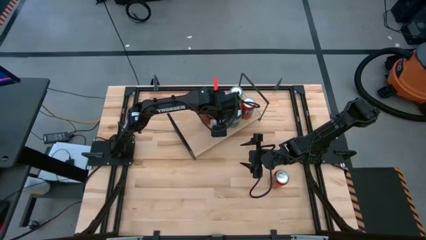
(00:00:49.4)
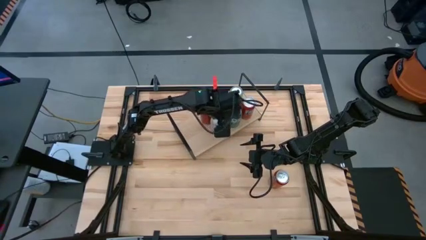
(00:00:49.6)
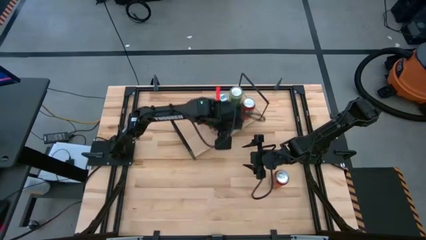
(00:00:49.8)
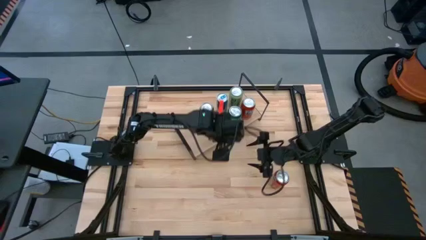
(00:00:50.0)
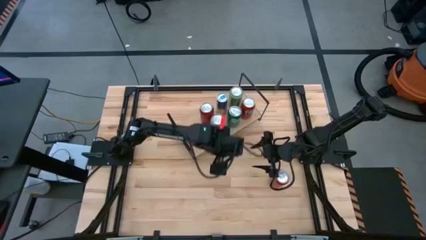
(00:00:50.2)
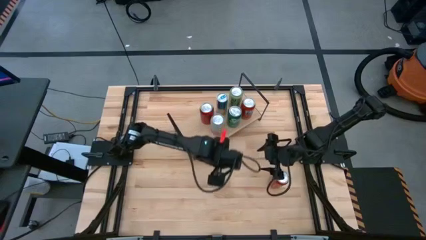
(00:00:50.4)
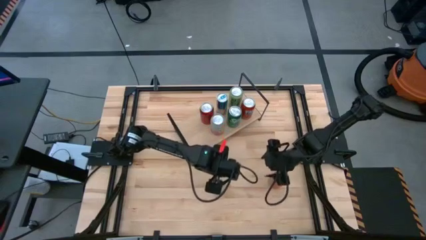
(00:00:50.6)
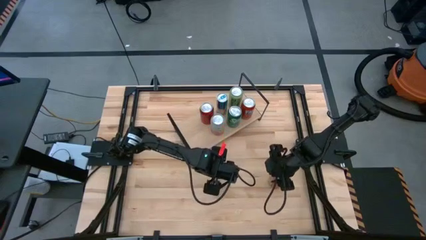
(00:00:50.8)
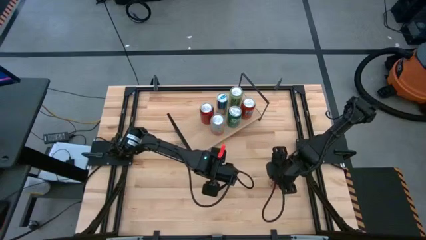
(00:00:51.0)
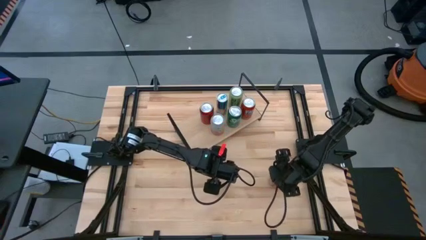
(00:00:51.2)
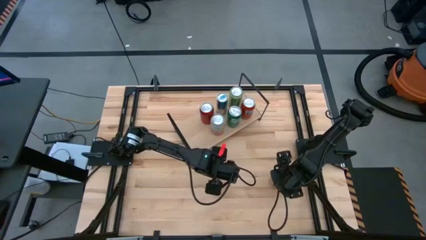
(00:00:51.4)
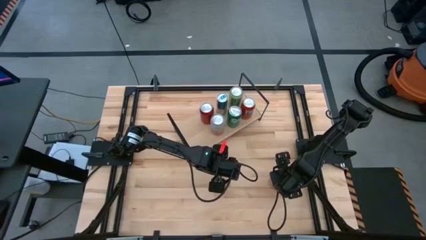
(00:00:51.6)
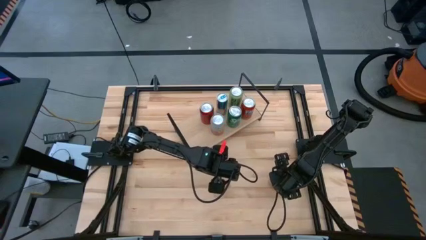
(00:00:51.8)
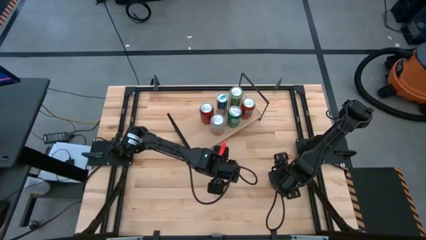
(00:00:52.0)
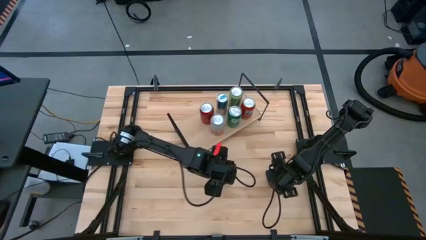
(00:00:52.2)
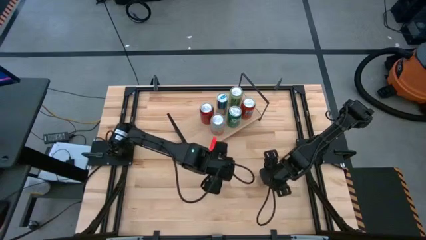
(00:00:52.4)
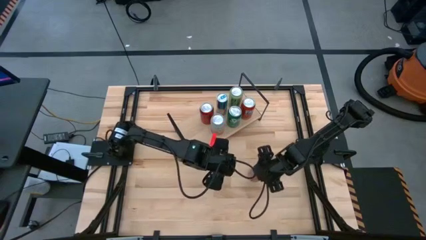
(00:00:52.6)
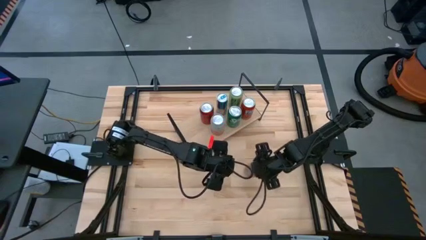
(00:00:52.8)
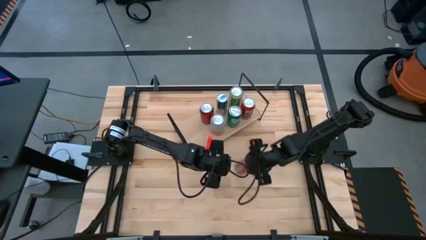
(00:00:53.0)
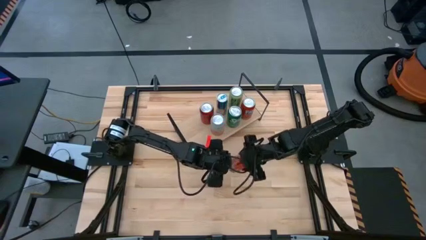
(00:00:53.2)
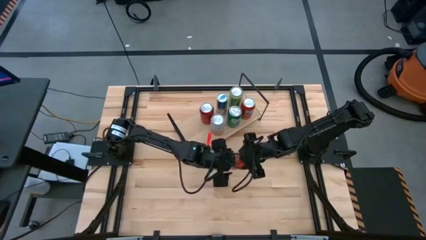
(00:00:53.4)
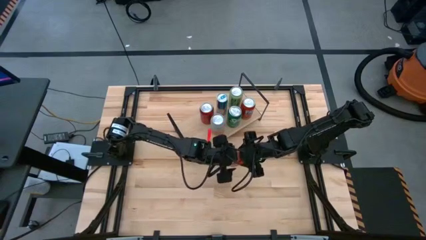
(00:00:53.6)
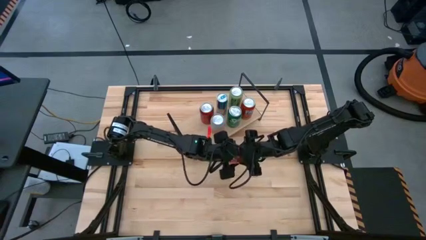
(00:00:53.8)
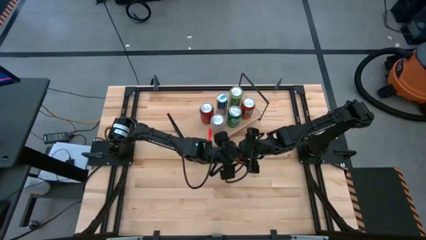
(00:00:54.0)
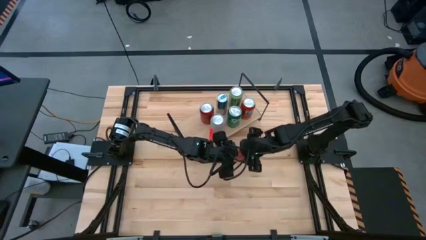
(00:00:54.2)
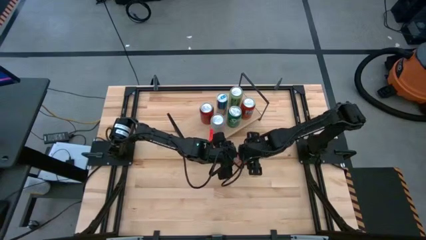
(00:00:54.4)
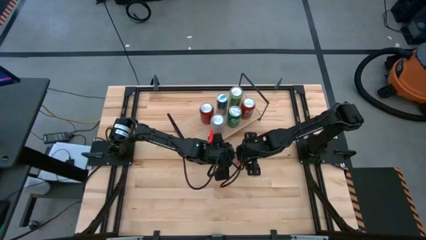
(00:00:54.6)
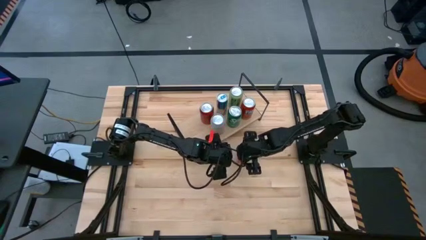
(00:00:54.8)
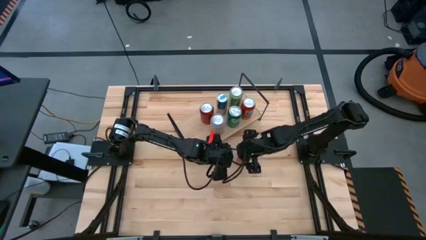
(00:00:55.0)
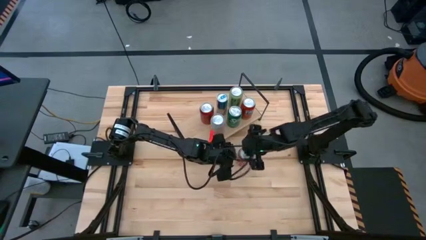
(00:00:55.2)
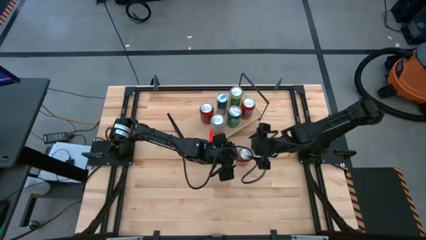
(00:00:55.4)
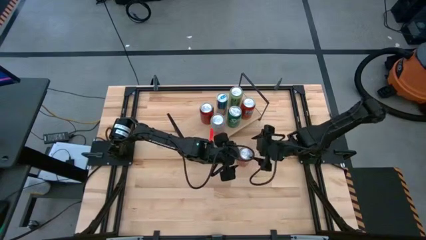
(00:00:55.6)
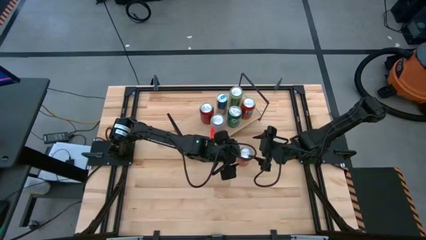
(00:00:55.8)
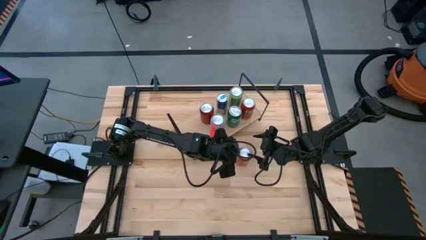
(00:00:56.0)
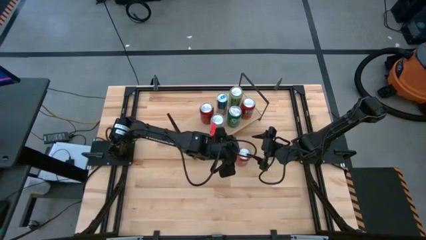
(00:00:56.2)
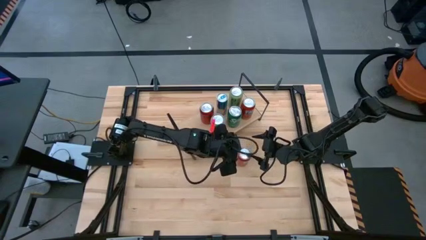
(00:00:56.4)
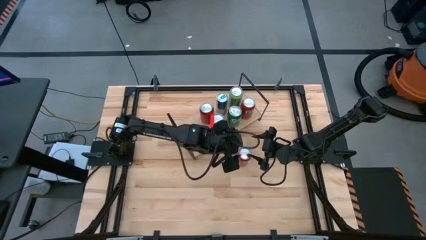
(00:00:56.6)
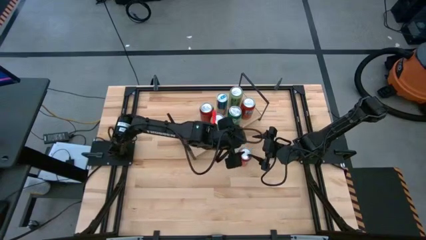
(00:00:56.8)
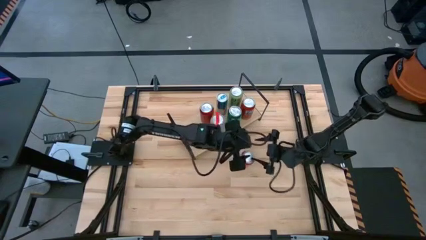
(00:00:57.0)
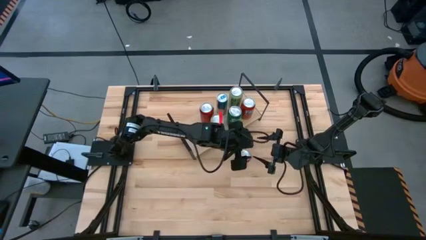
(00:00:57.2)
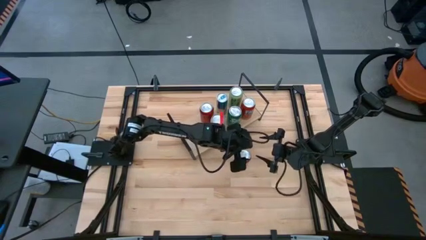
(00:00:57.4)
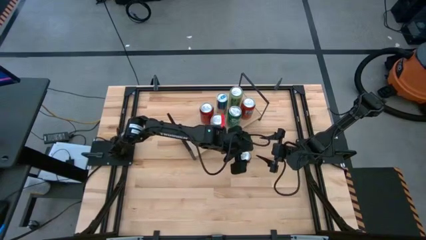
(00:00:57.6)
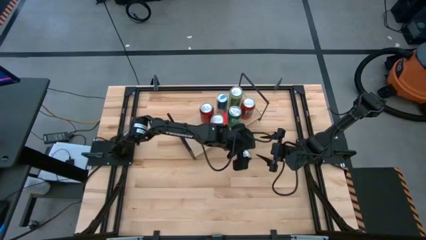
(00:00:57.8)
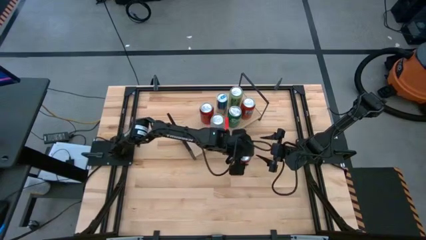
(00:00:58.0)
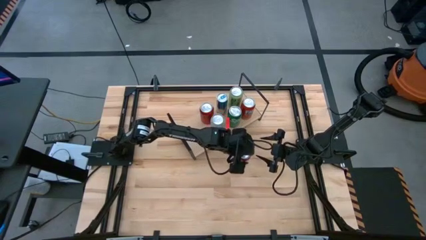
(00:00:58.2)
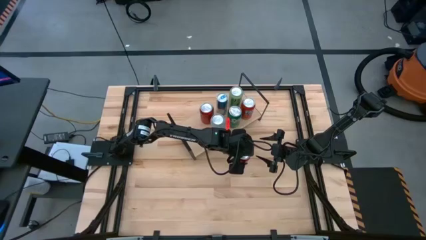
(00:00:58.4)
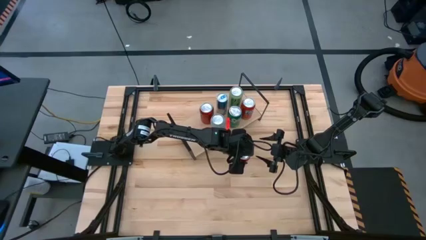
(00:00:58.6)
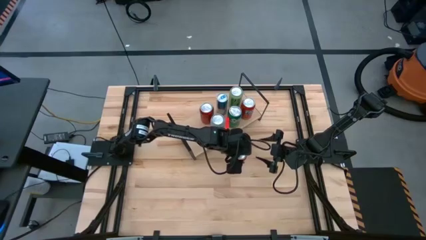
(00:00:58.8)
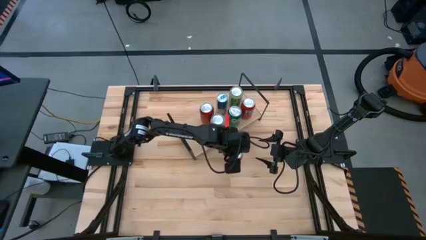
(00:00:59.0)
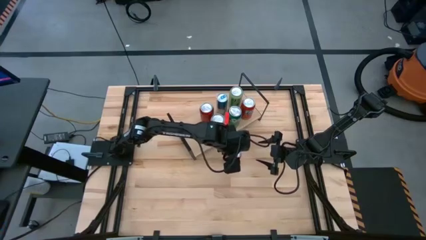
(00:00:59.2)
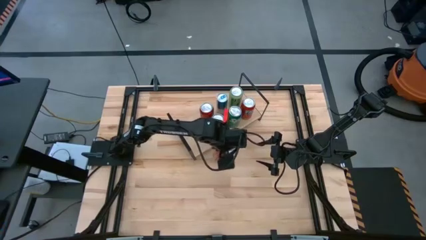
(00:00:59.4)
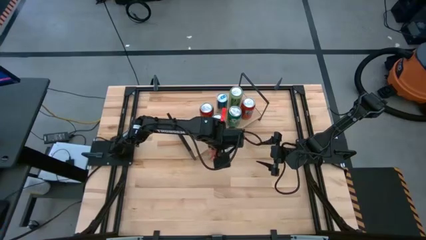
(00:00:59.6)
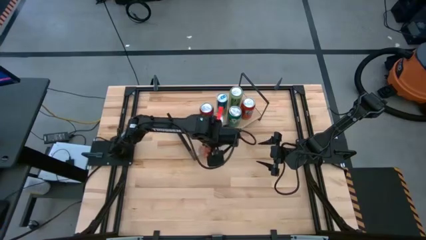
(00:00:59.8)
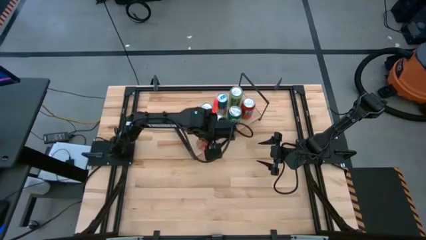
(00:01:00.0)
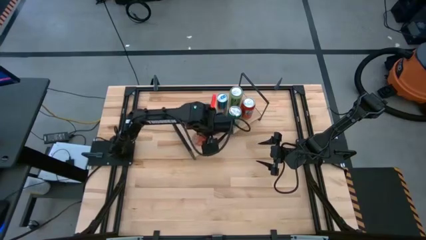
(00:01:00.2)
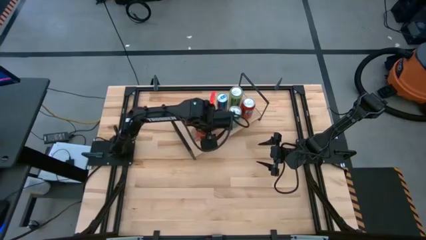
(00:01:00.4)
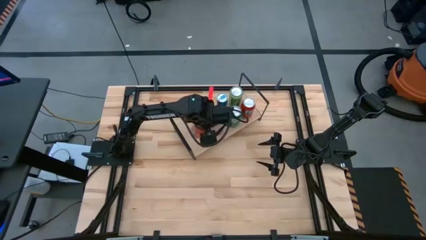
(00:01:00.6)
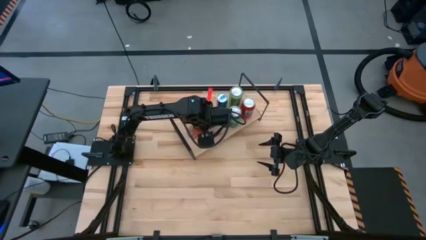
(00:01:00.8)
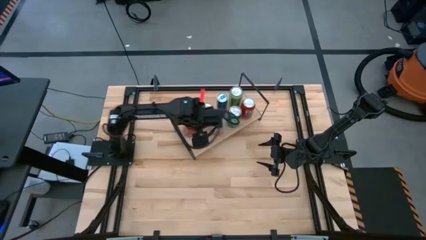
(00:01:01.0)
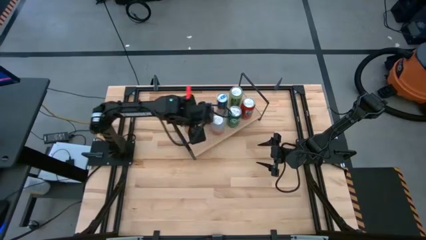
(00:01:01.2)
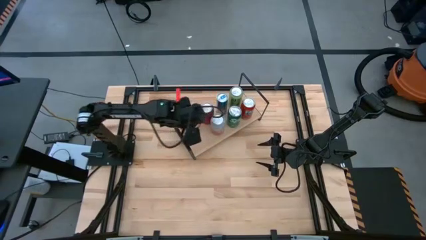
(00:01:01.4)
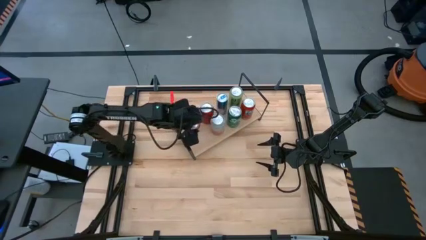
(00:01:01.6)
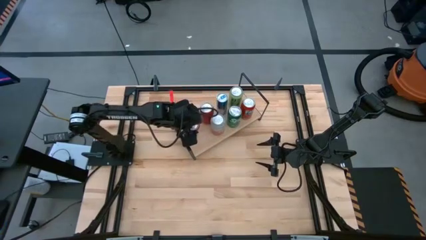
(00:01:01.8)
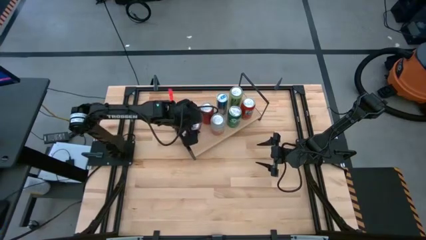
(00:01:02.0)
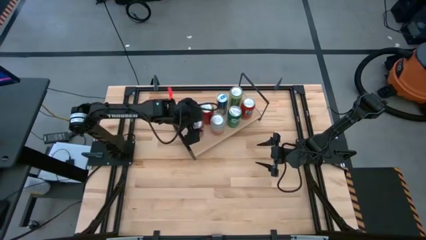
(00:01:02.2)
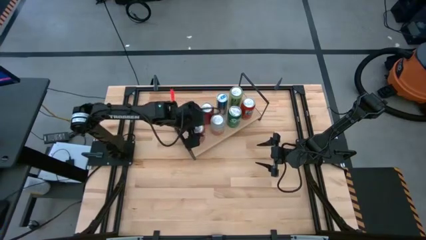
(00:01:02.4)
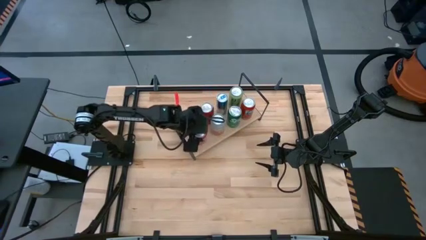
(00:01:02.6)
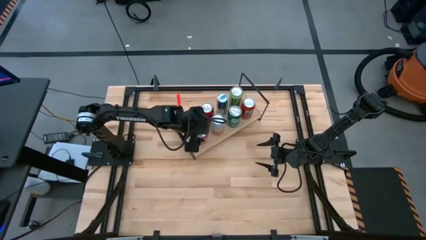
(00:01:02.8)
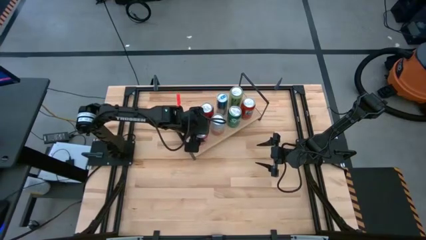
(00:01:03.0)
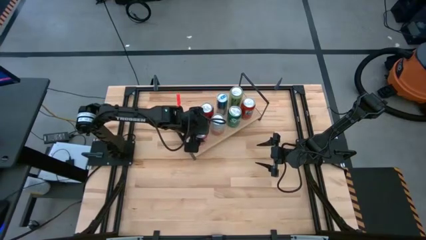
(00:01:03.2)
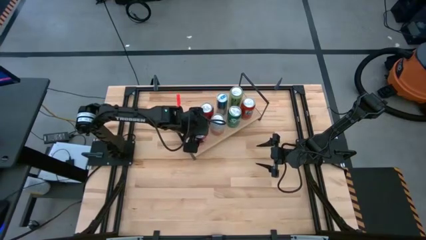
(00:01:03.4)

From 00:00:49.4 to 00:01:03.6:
Task: Place canned beverage on shelf
Put the orange soda can on the shelf

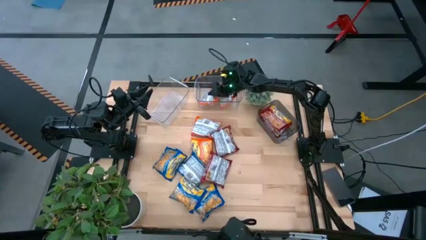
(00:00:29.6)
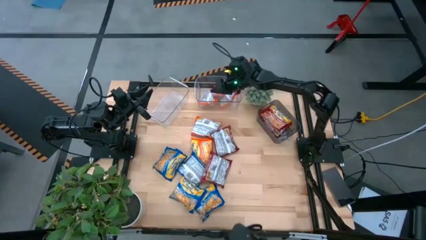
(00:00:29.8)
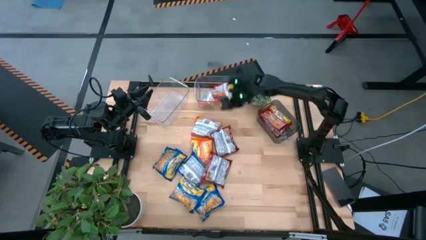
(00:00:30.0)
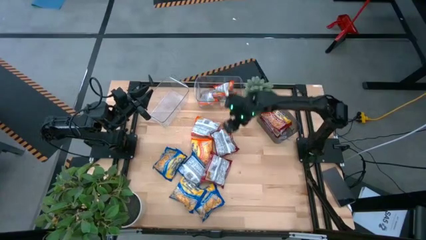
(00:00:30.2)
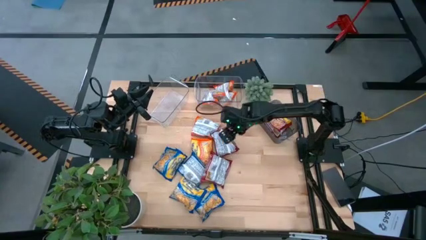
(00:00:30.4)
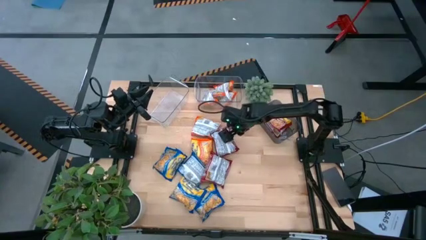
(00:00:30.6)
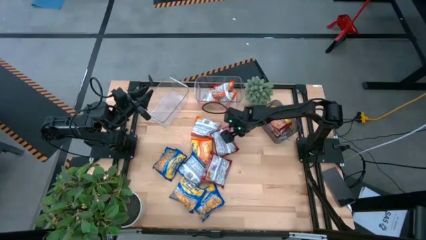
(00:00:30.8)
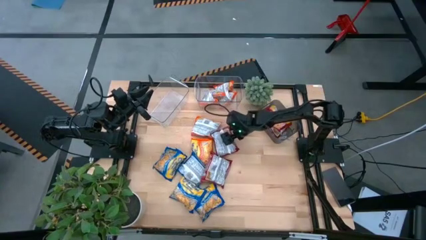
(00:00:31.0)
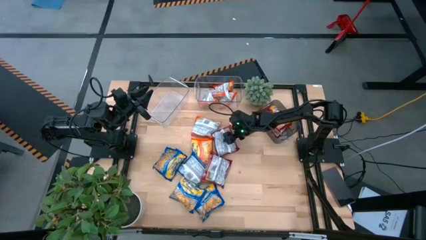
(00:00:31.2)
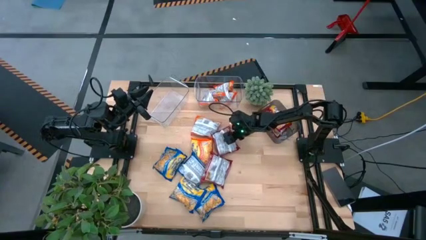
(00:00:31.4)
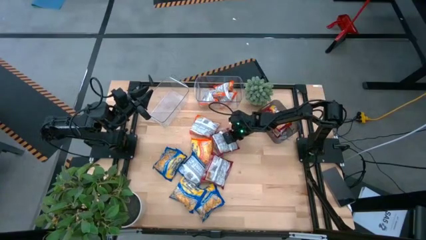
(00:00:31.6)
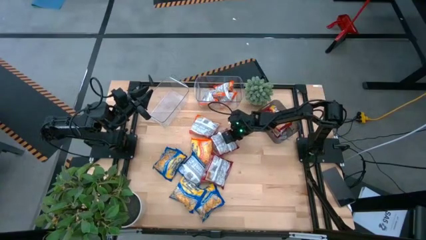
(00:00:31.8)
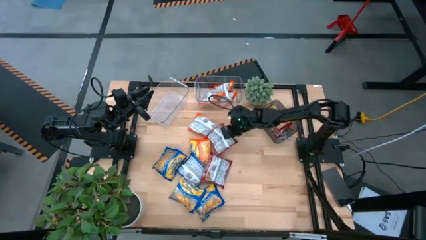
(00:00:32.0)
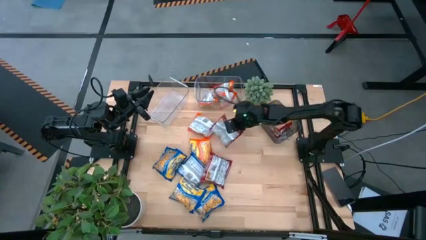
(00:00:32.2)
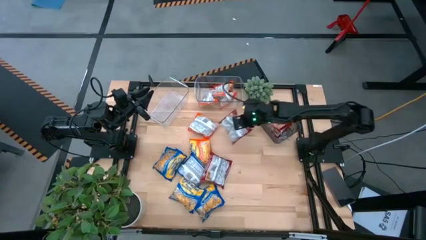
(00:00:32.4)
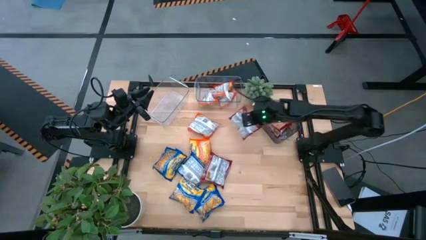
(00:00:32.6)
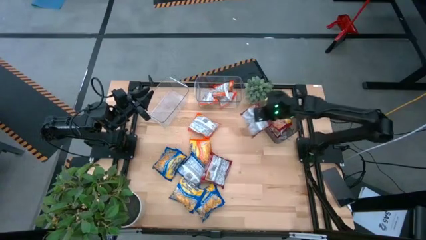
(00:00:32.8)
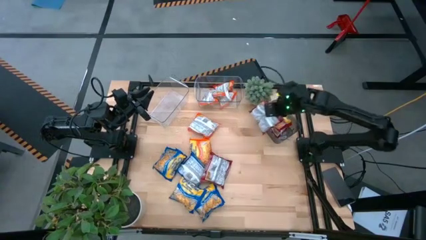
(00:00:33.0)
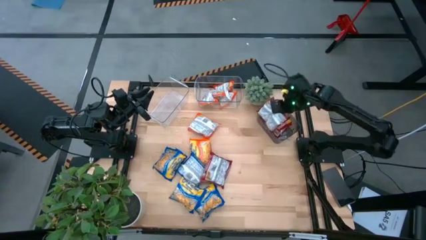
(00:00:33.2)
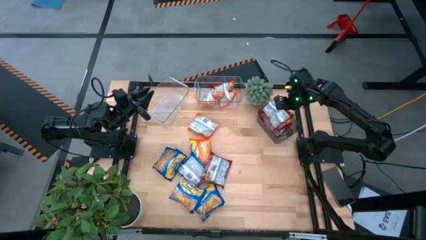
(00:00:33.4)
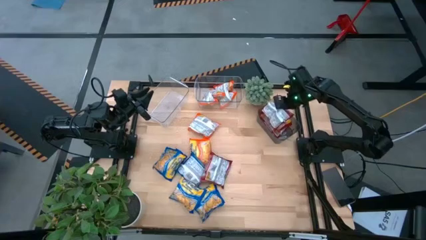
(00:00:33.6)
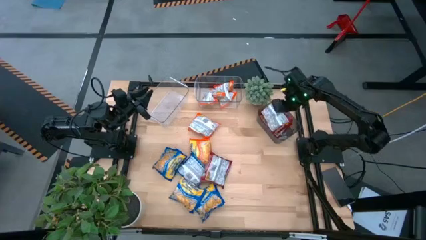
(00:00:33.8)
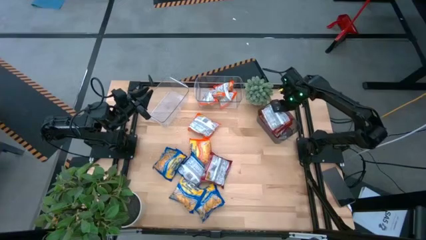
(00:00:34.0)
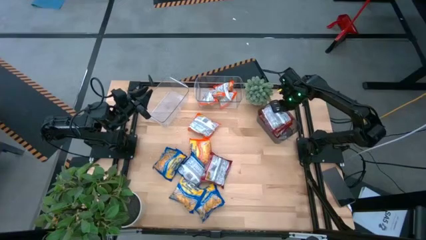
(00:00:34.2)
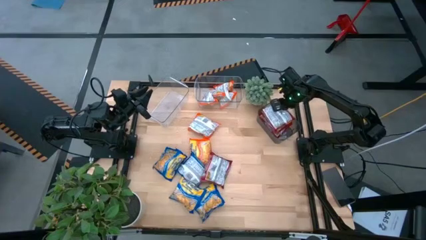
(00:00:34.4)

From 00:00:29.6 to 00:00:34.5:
Task: Sort Maruchan noodles
Put the red noodle pack into the transparent black bin
